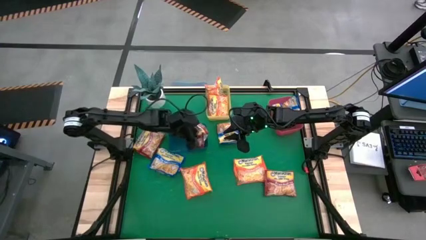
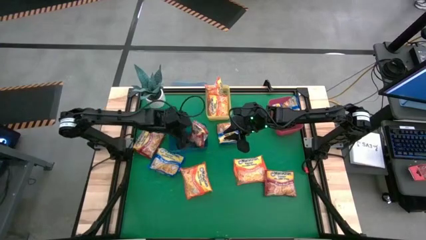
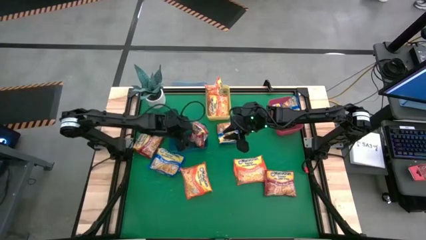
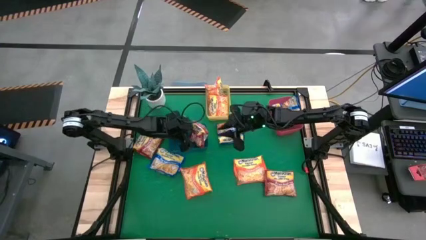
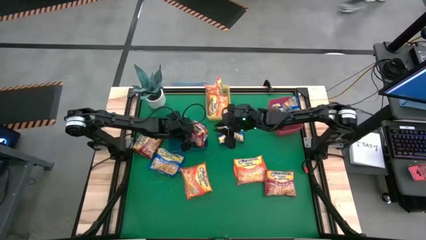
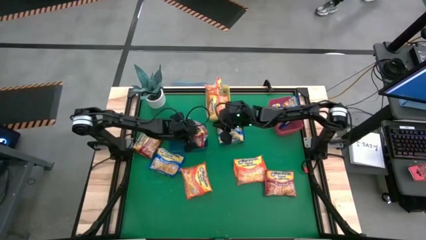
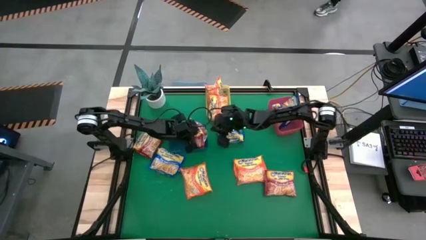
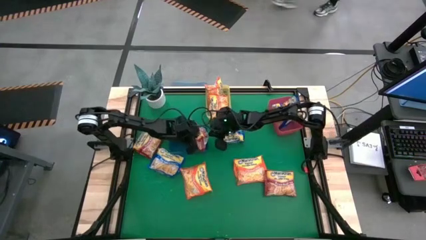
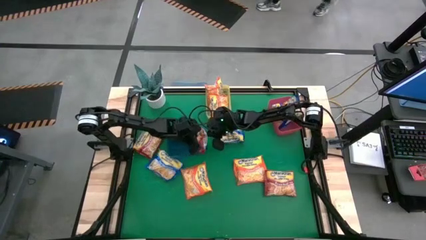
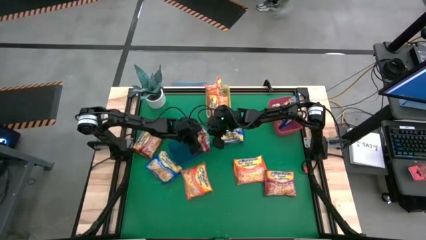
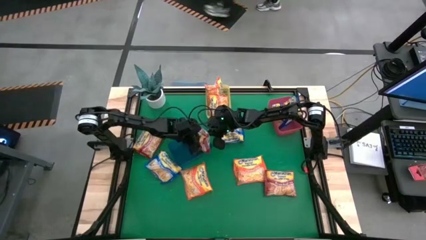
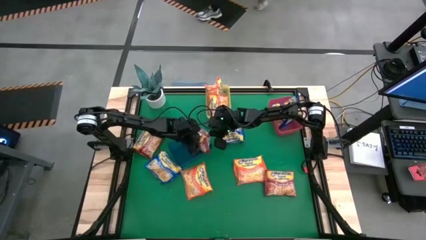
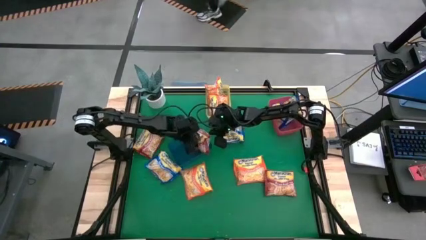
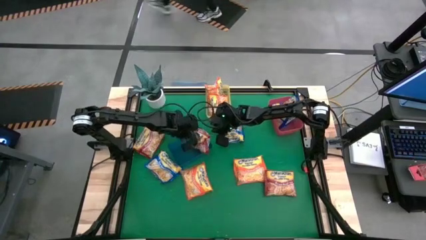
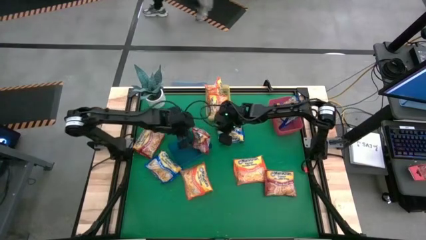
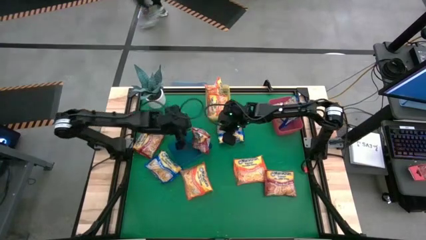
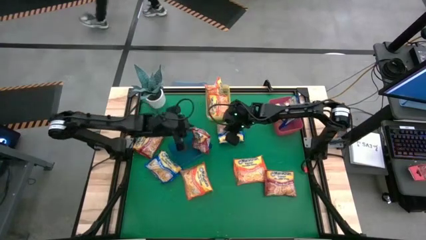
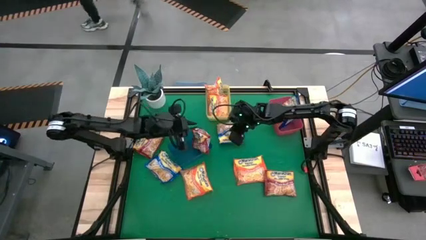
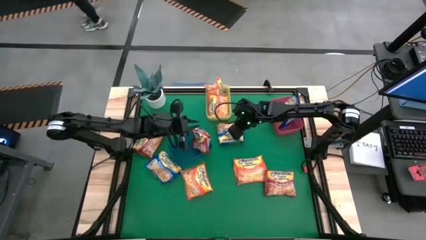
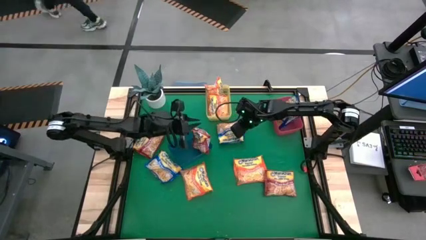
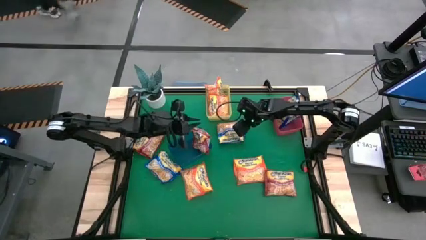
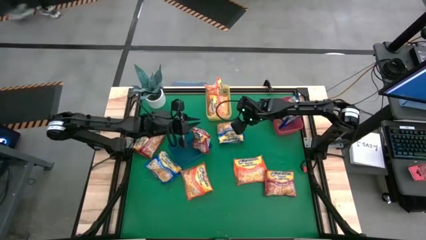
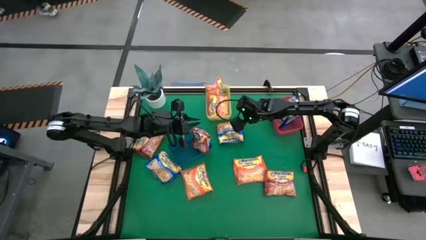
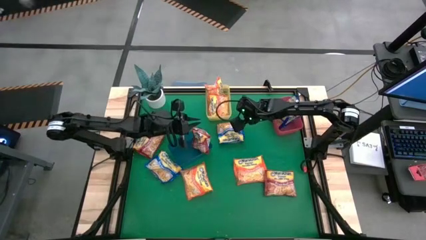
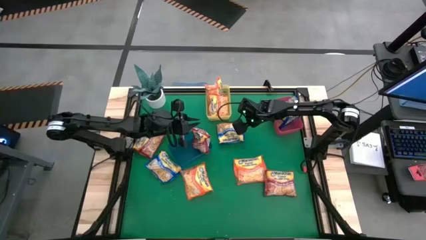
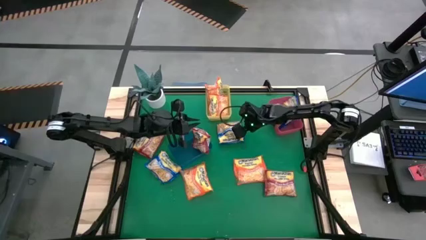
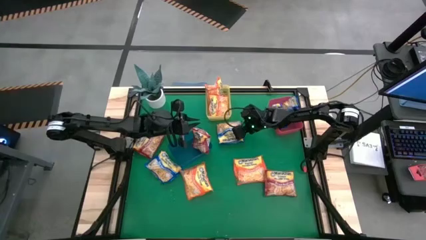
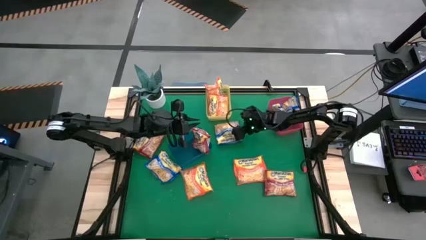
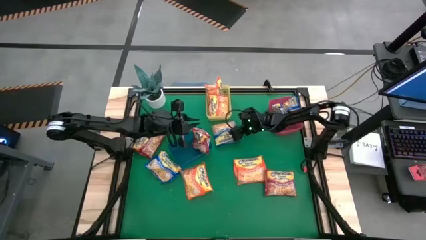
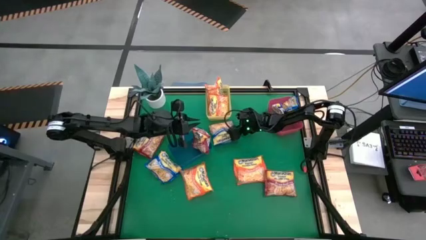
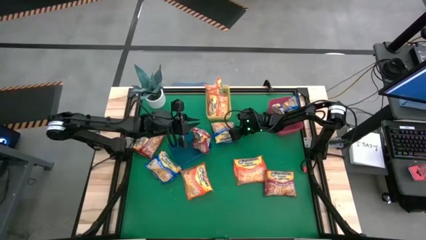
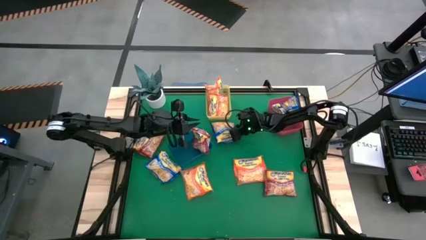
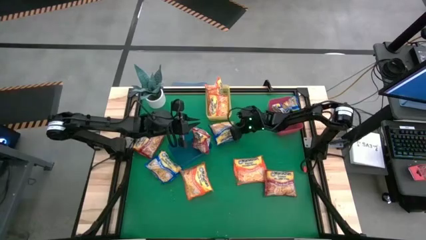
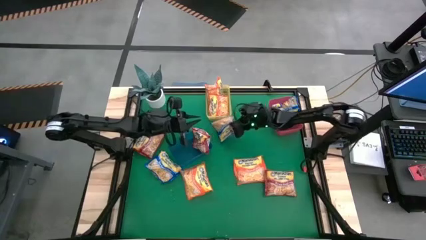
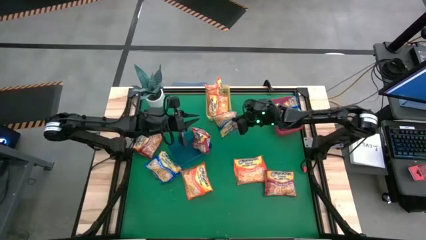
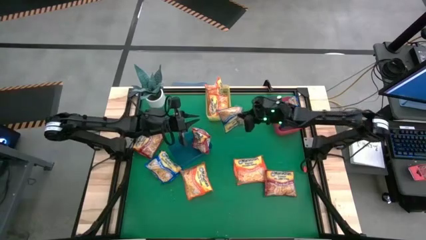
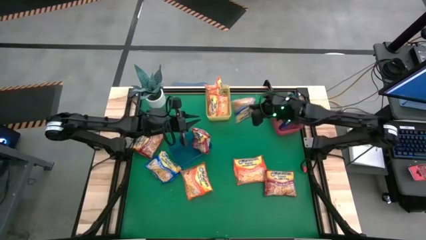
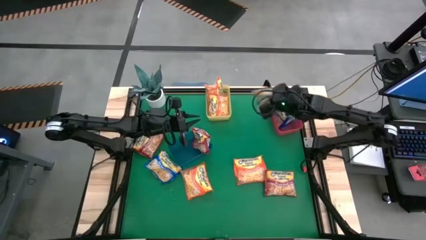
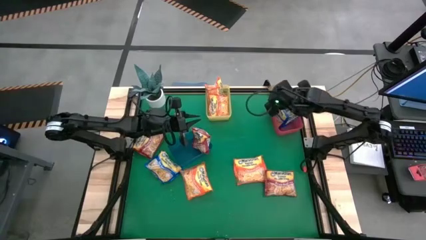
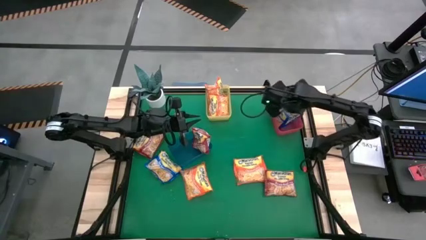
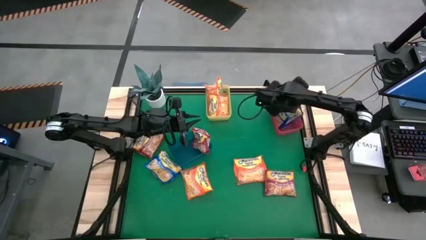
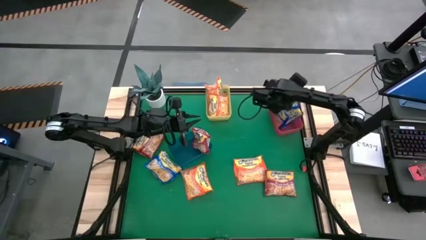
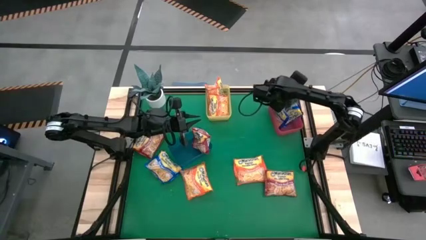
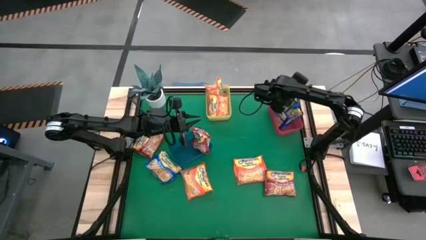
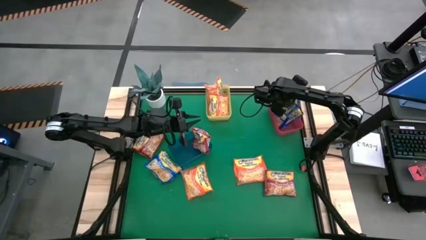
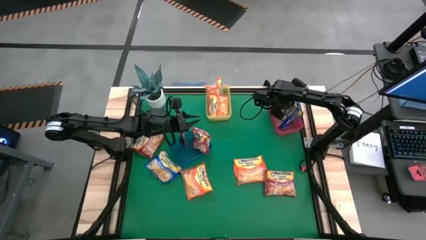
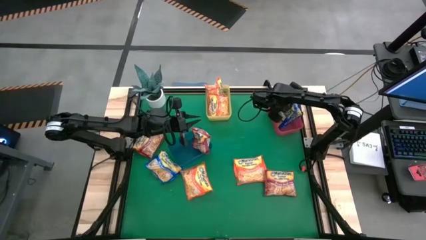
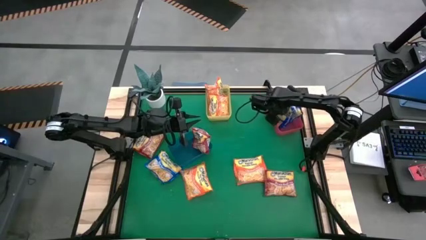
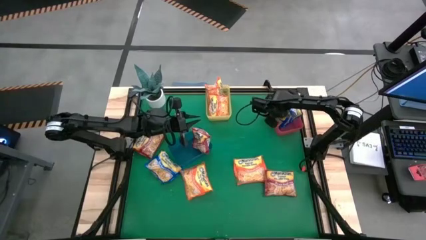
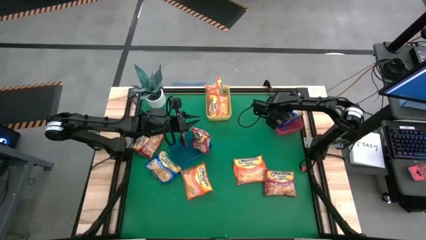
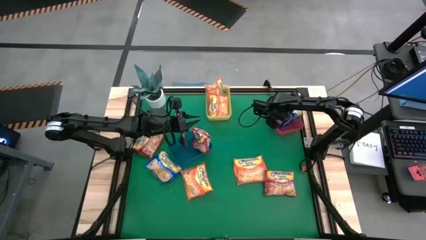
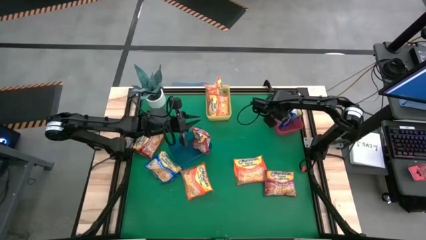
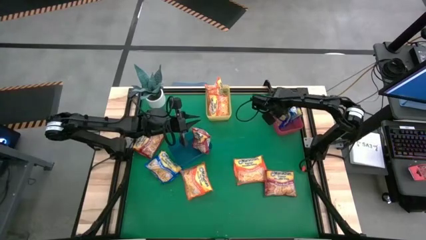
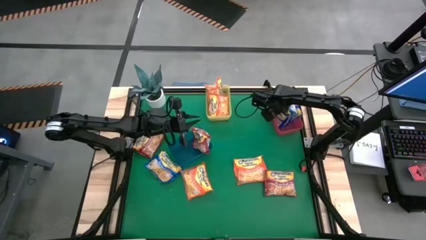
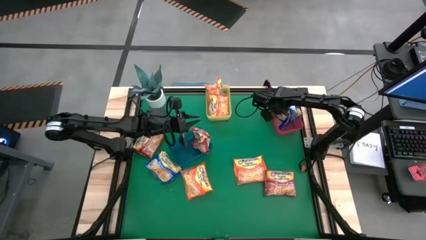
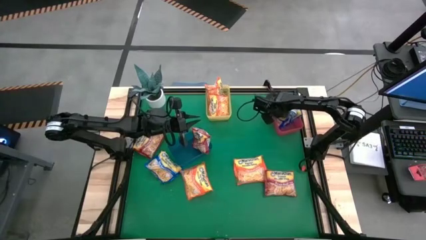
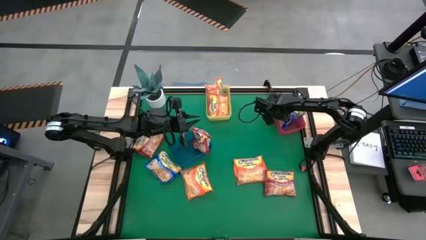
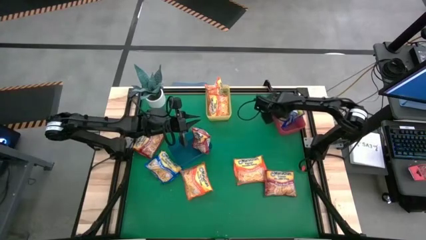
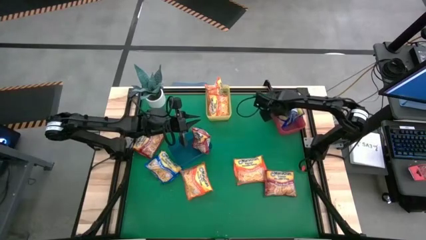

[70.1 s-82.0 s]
Task: Sort Maruchan noodles
Put the blue noodle pack into the red bin

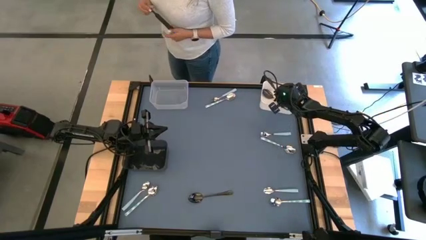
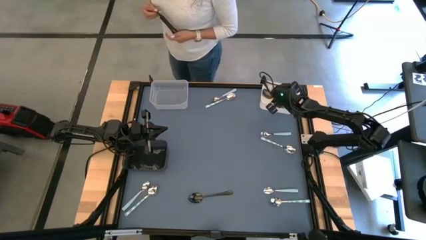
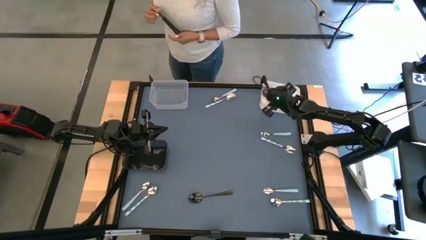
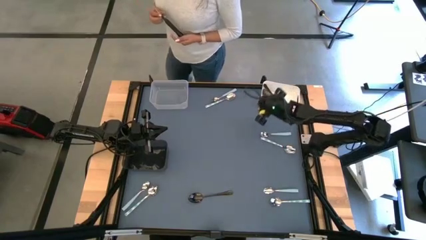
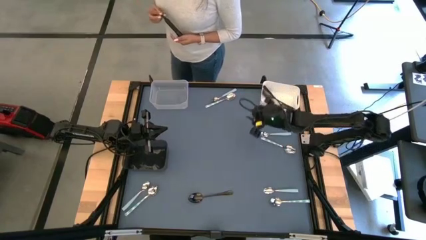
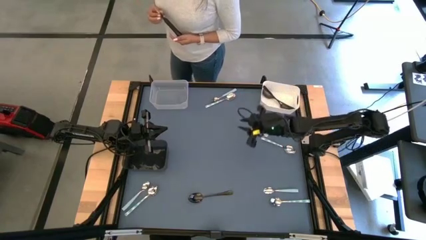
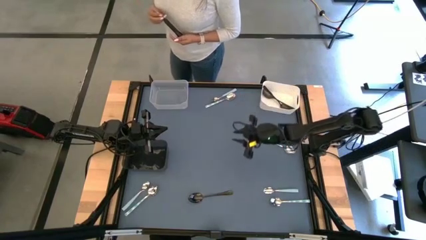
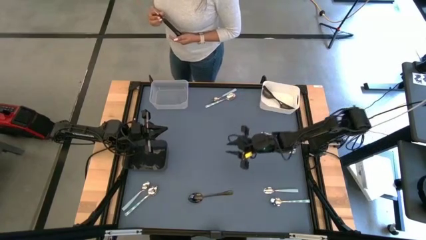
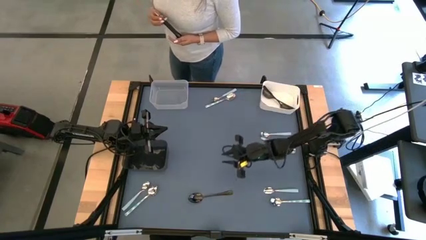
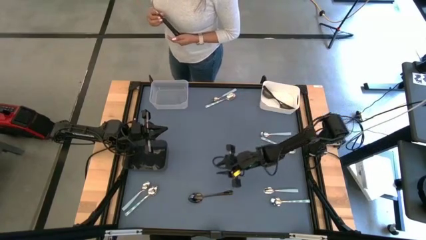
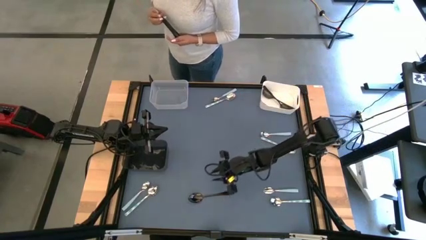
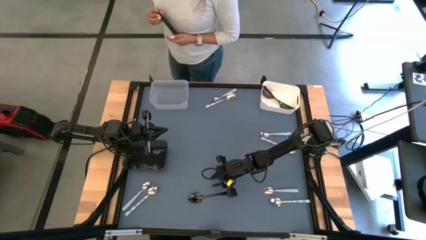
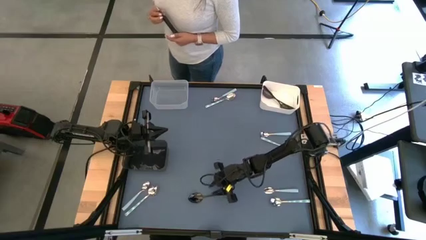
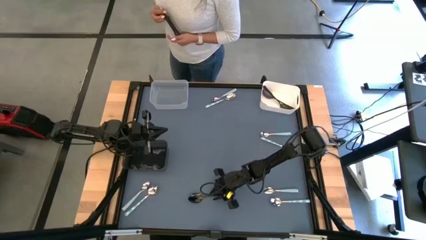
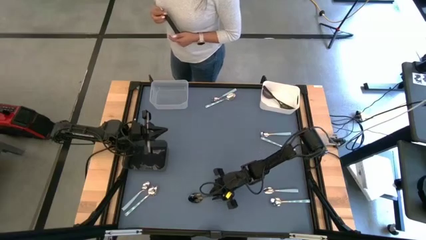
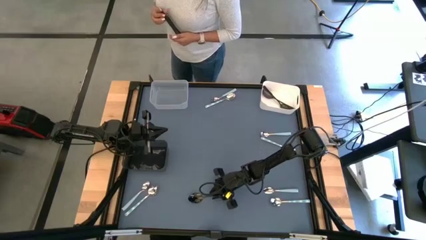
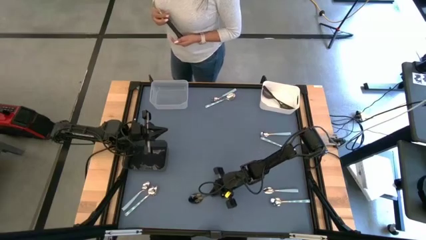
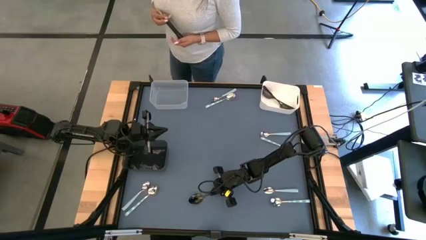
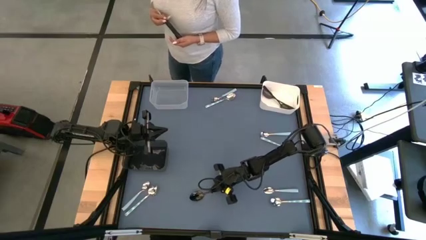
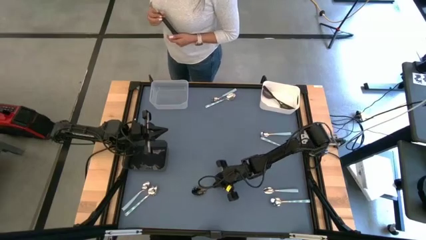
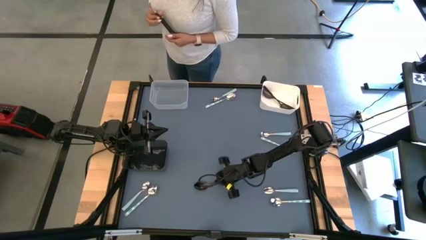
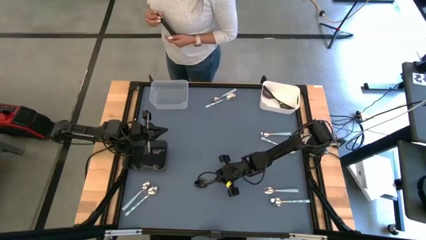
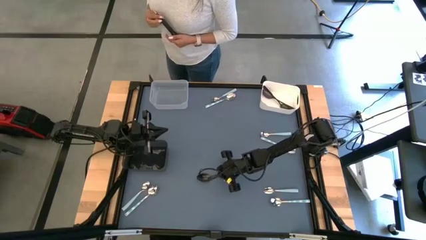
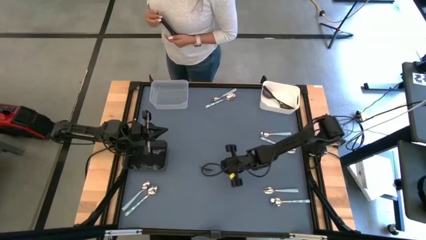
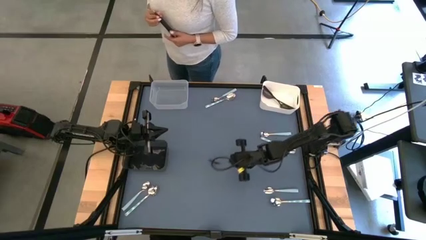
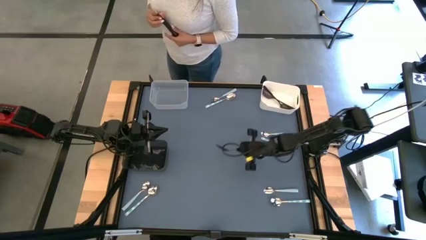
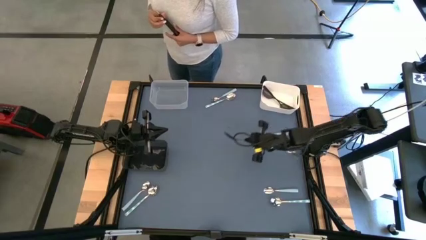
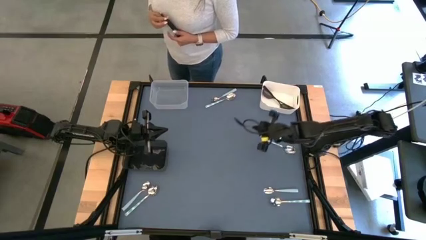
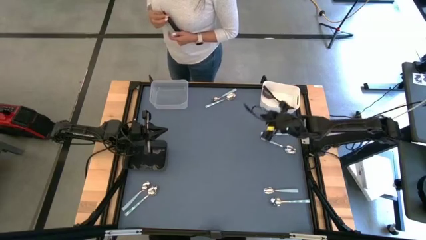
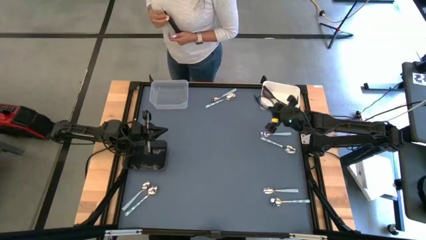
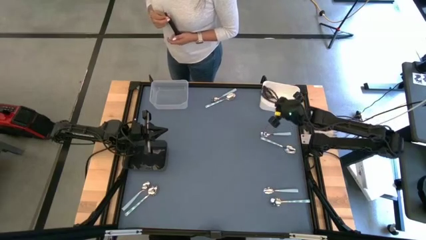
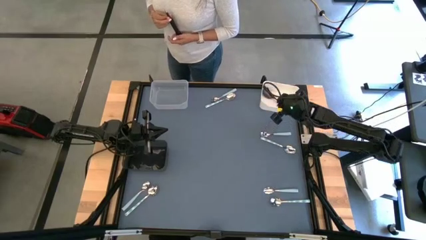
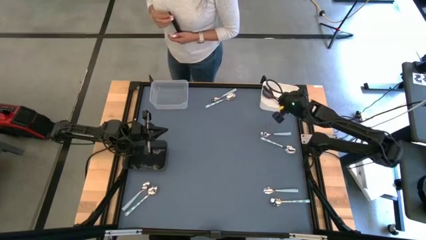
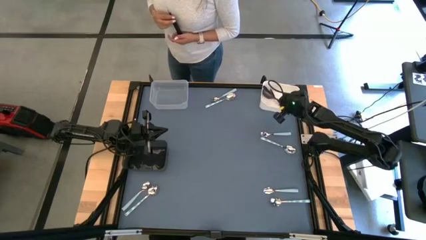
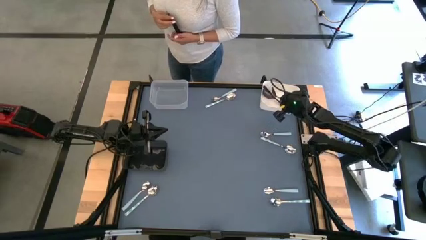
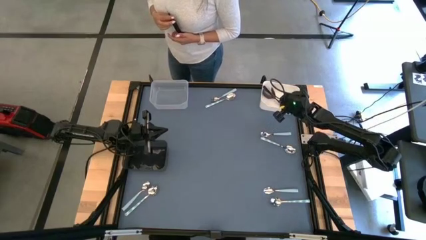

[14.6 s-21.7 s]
Task: Sort silverware by color (type)
Put the black spoon into the white bin
